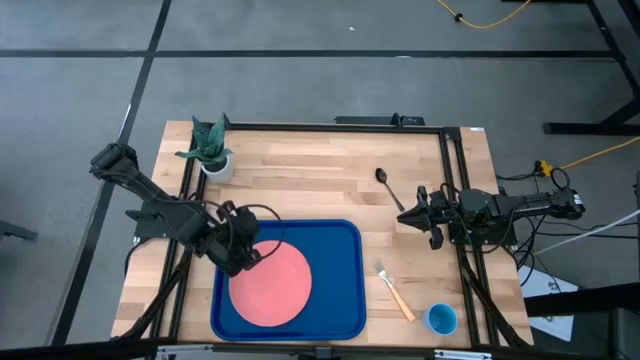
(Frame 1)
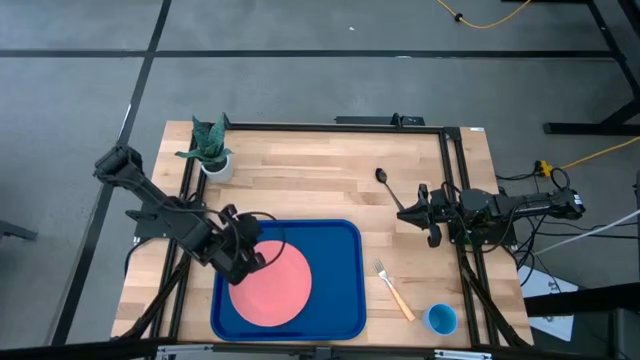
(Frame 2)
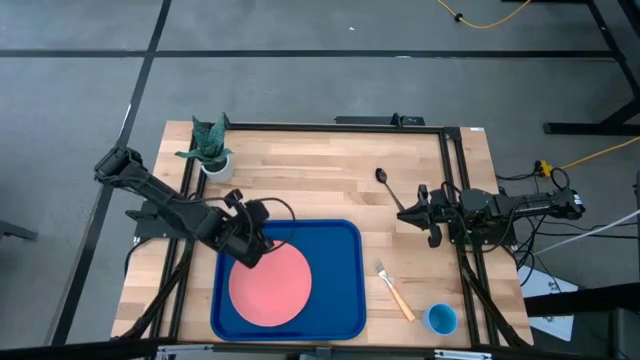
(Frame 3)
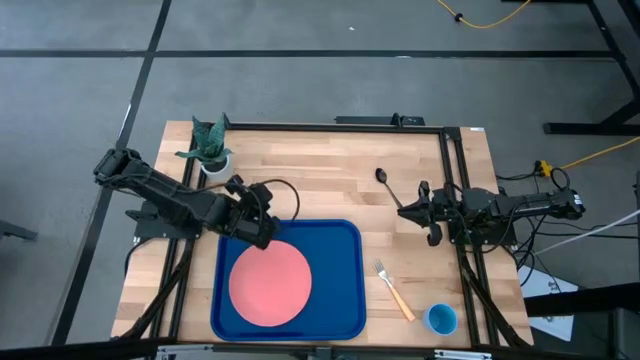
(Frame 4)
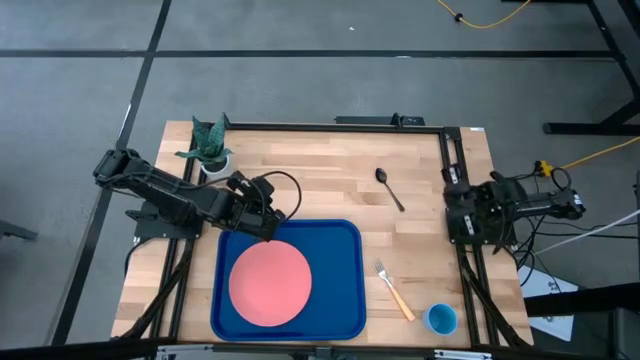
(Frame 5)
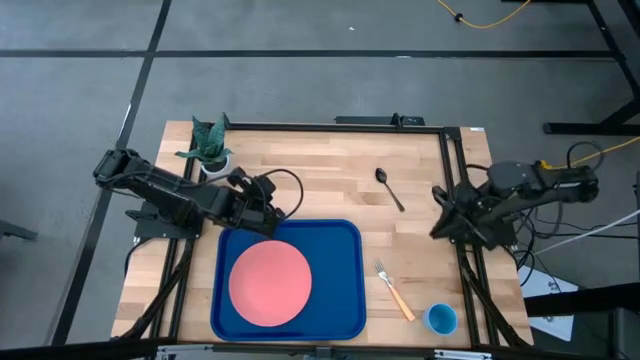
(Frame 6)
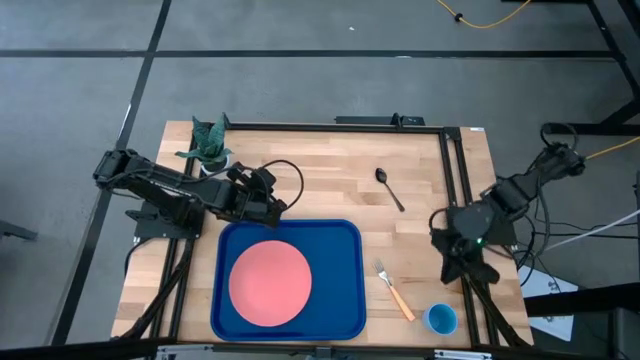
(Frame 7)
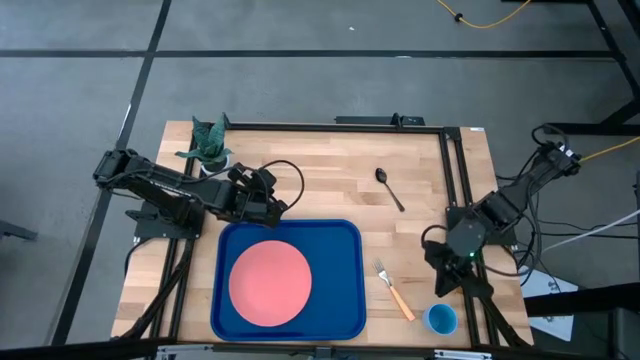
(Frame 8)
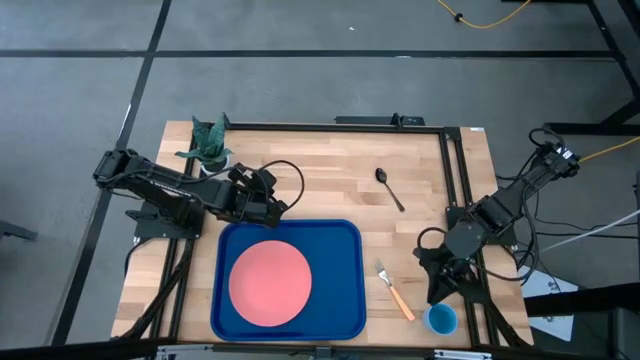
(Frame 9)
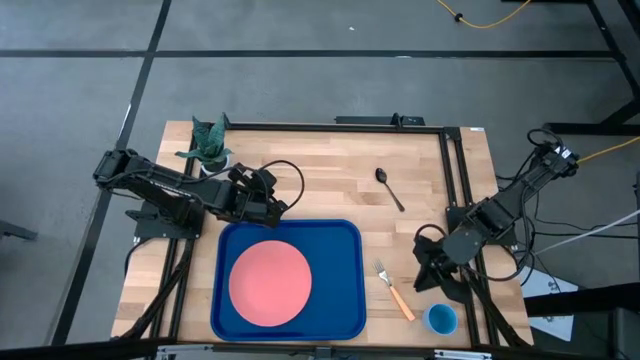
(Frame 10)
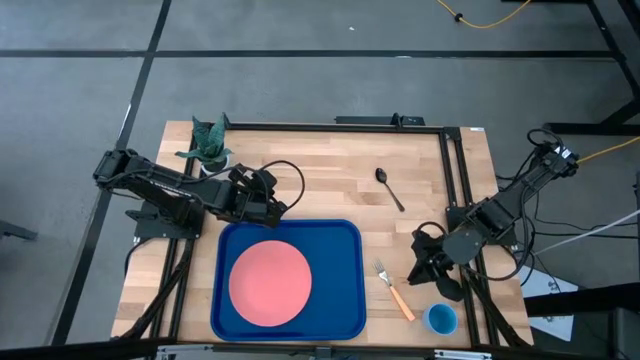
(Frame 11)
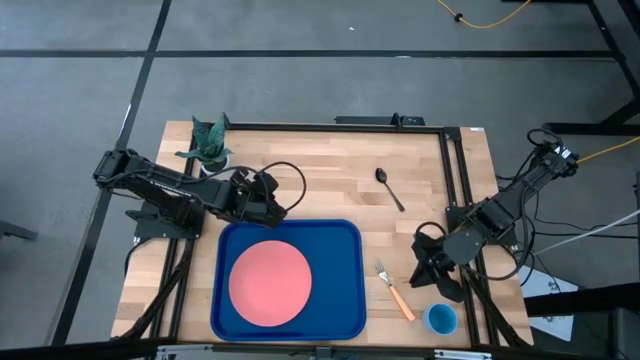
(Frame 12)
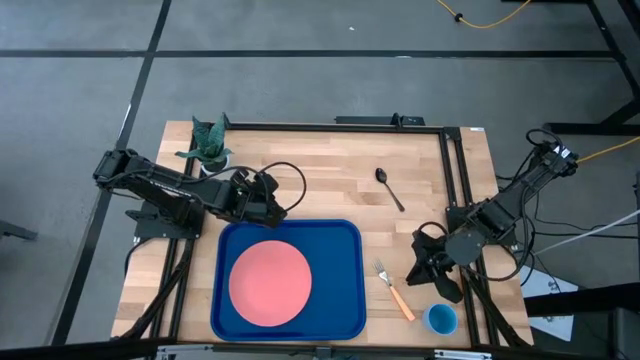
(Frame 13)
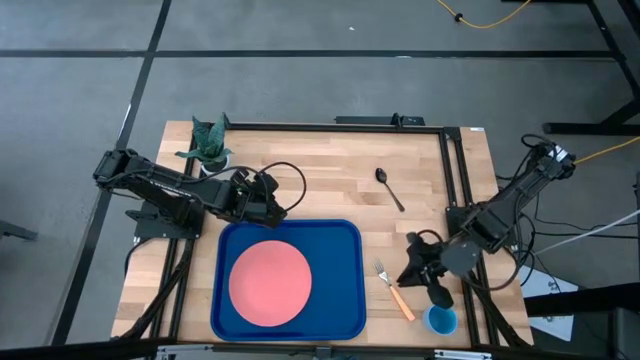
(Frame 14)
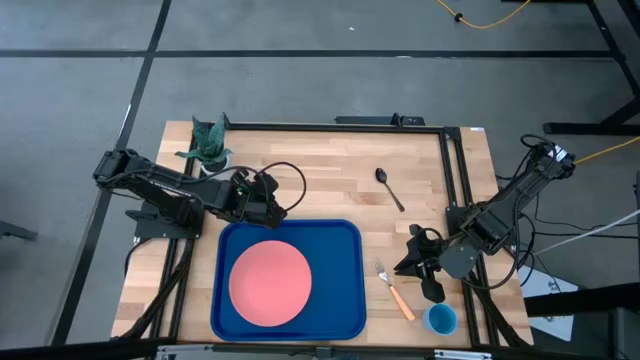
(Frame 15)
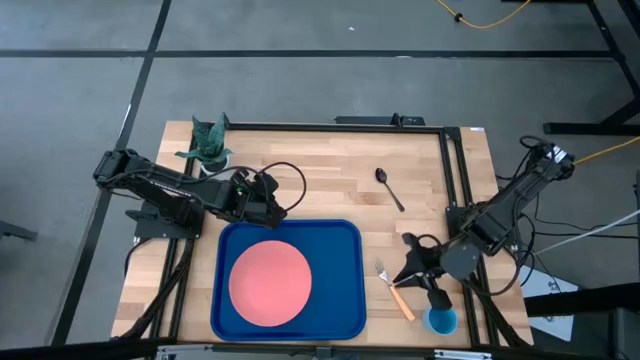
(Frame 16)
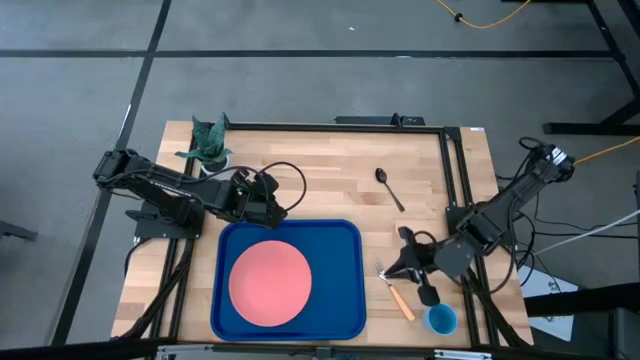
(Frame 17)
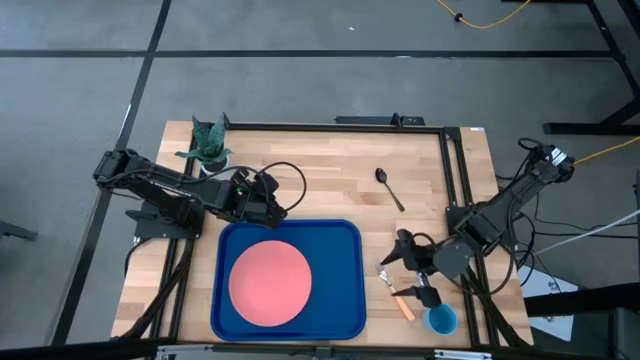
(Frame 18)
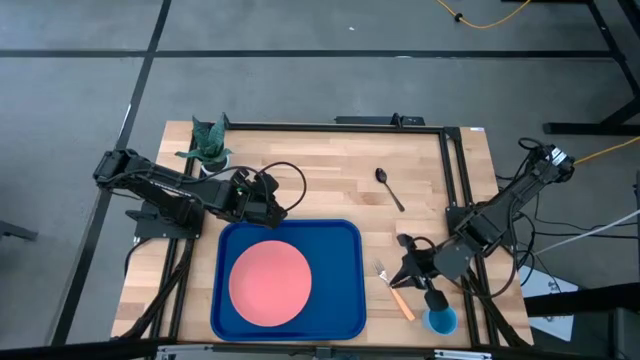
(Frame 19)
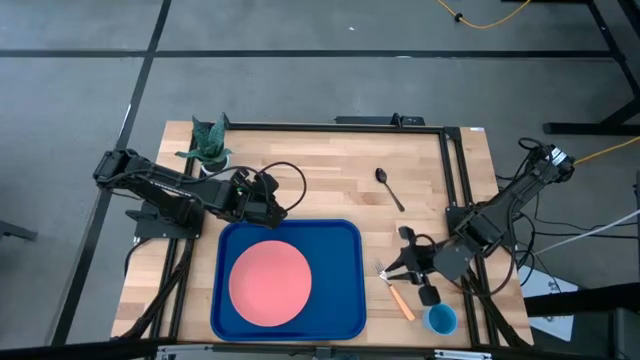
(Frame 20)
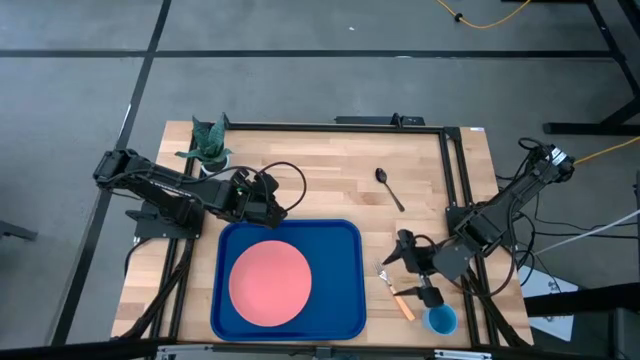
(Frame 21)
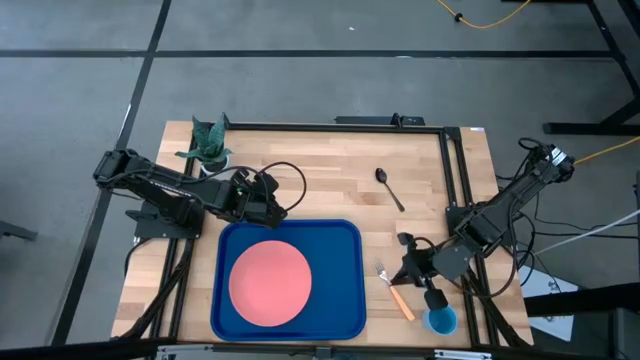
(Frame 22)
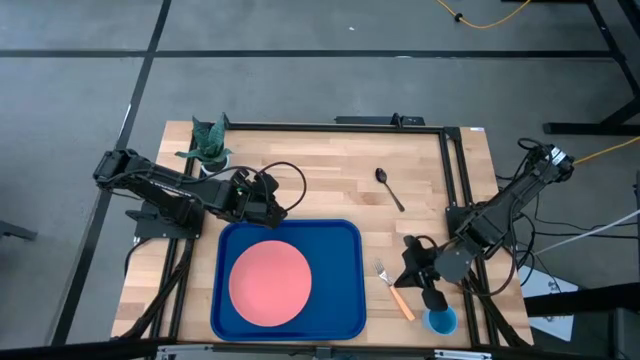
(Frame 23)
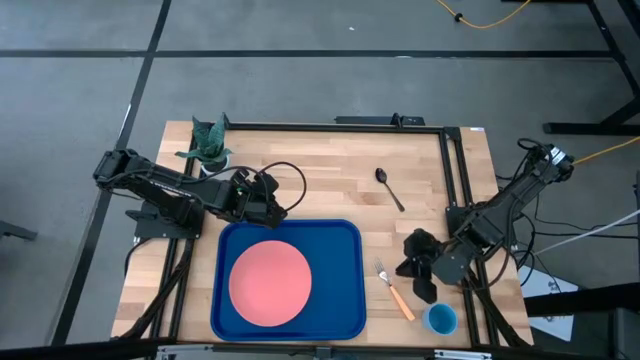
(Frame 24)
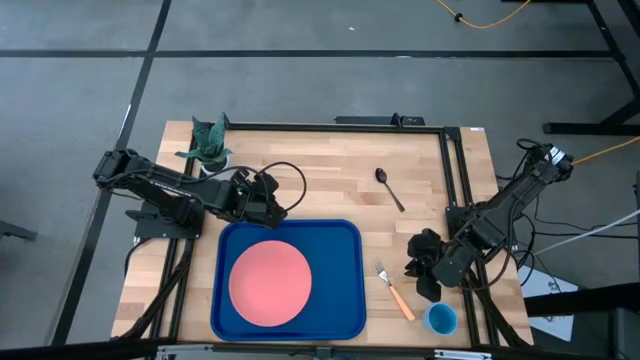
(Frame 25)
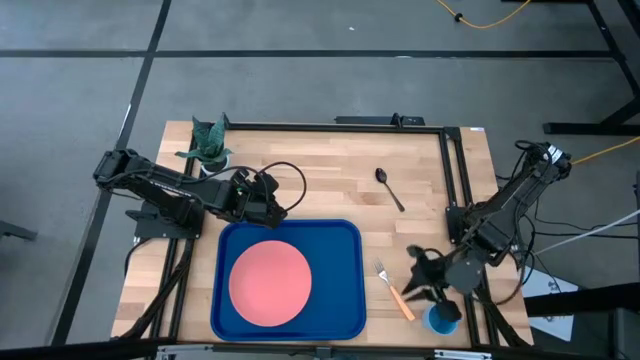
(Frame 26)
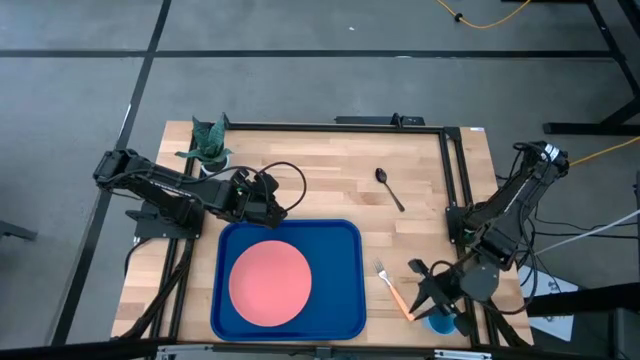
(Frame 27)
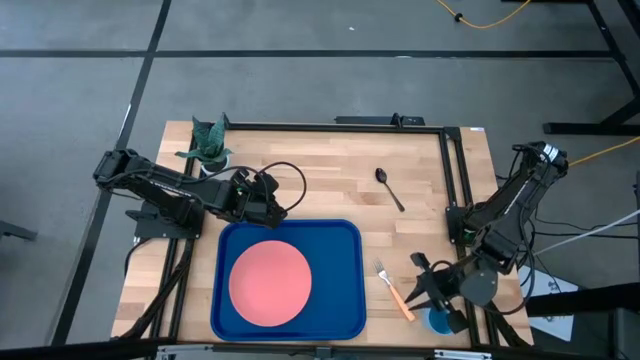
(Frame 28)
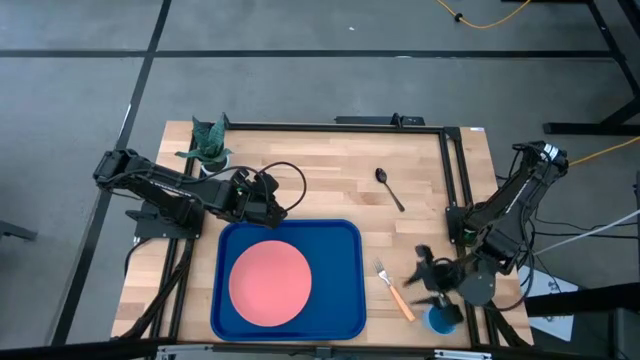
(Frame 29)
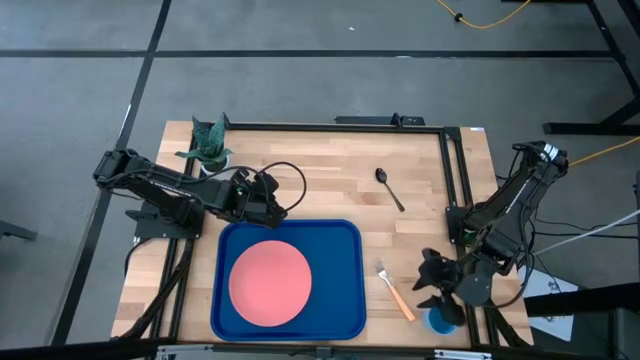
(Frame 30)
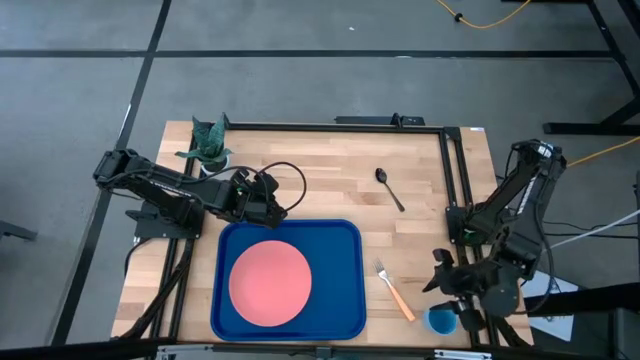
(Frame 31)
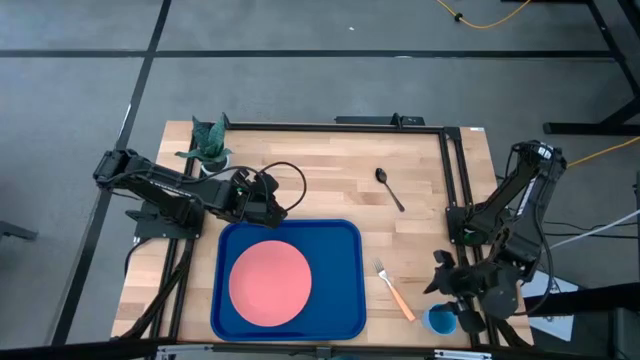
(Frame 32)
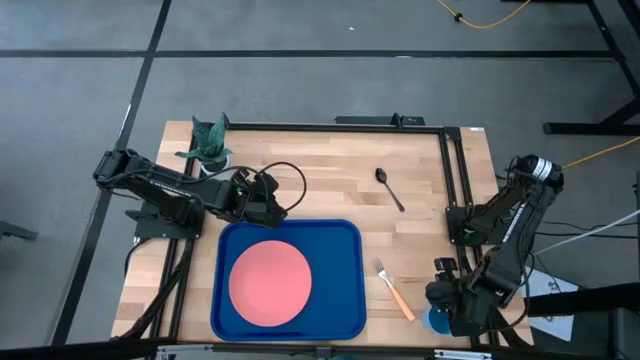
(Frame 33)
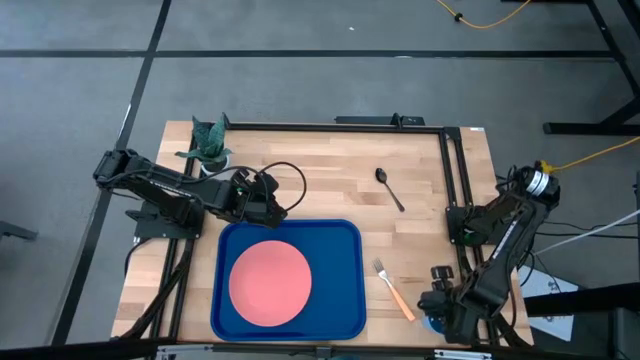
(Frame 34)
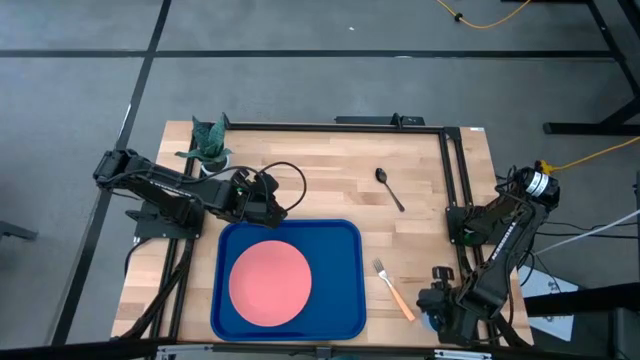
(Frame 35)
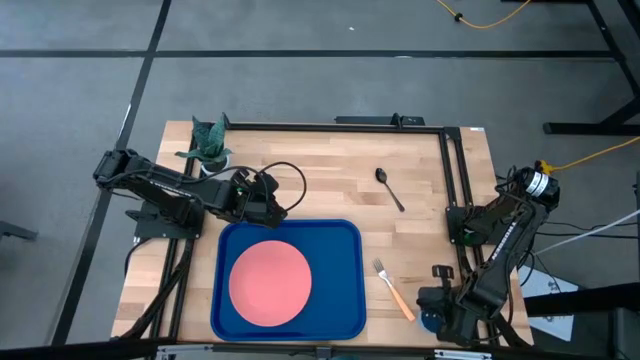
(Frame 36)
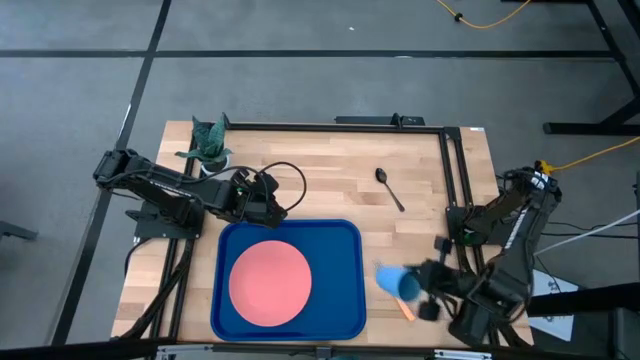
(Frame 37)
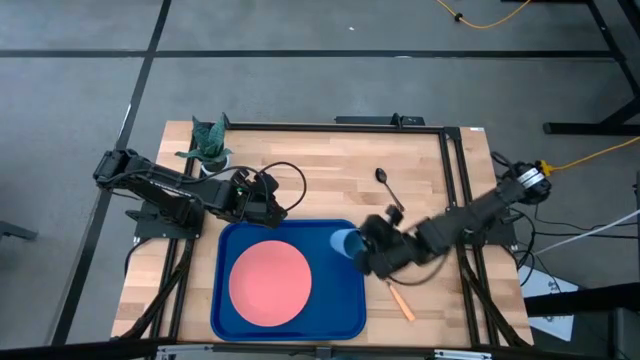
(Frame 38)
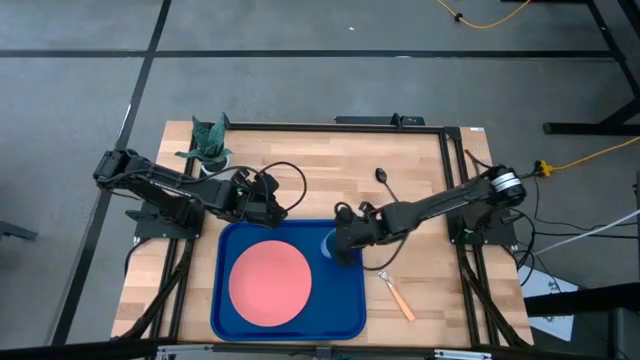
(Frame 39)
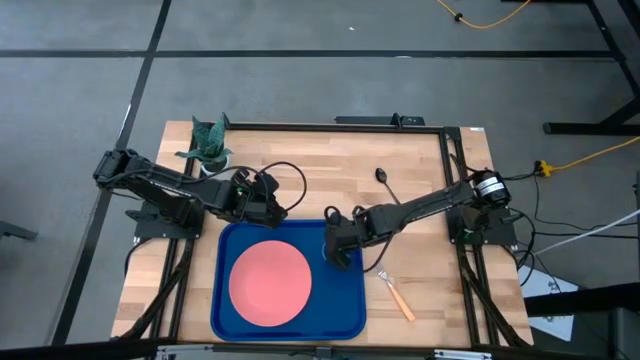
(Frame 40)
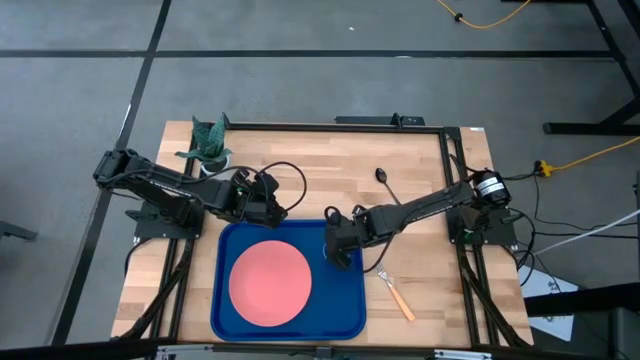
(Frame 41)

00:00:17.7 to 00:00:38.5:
Task: Pick and place plate/cup/fork/spoon on tray
Put the blue cup on the blue serving tray to the top left of the pink plate
